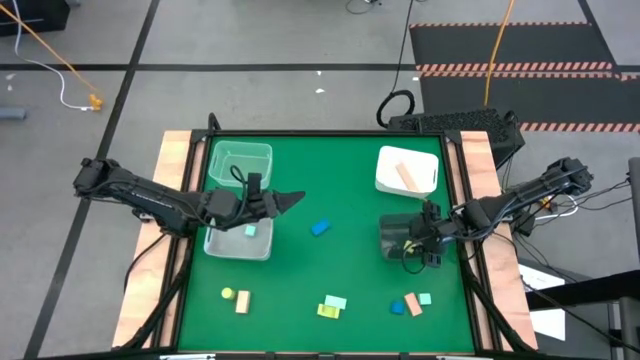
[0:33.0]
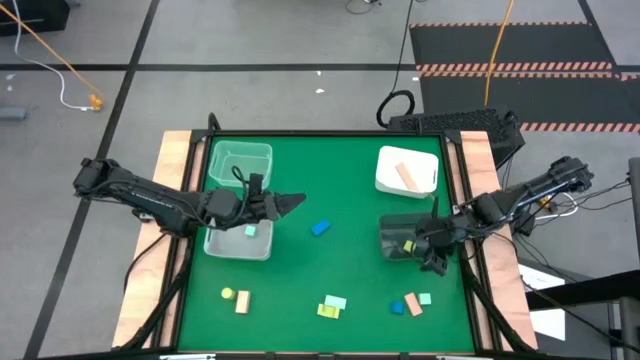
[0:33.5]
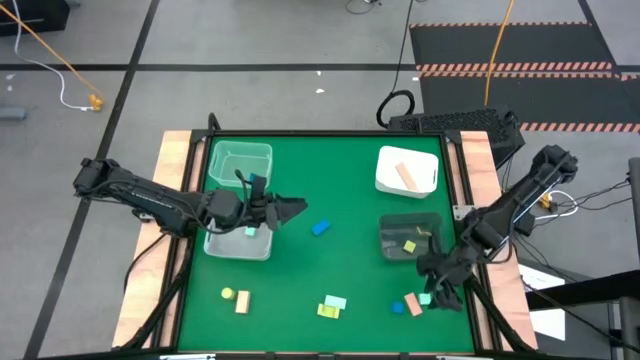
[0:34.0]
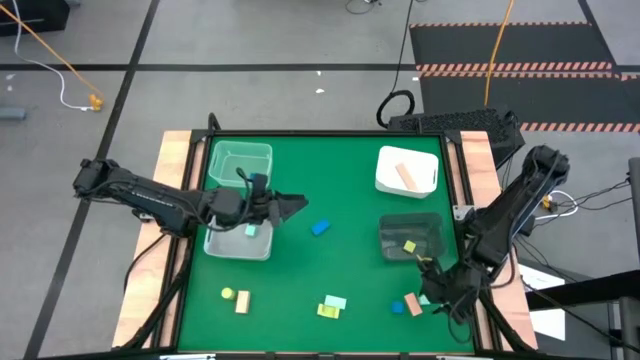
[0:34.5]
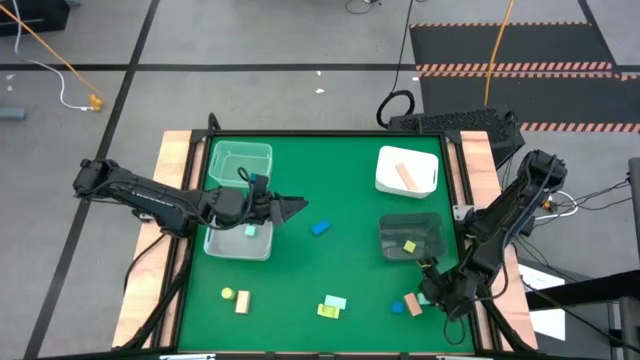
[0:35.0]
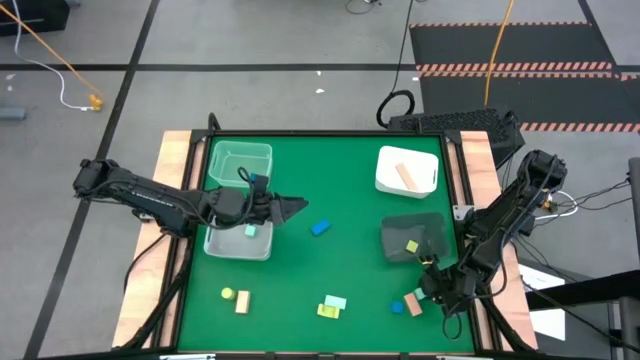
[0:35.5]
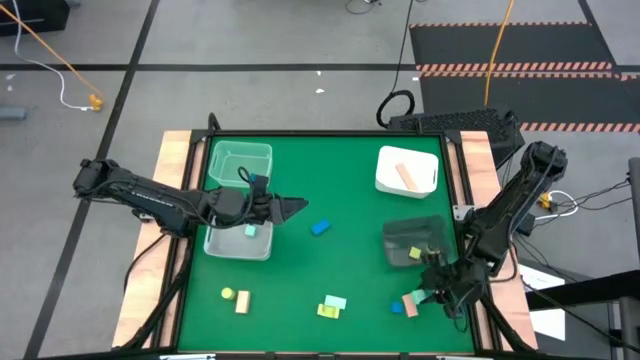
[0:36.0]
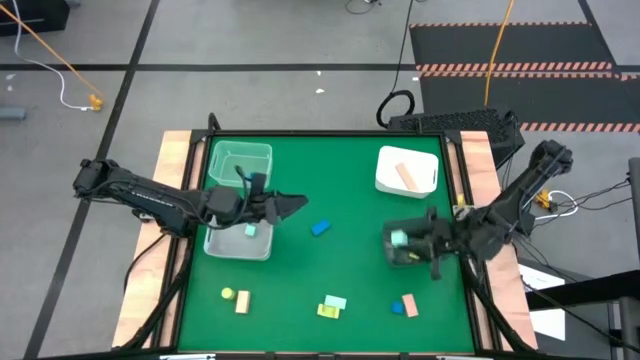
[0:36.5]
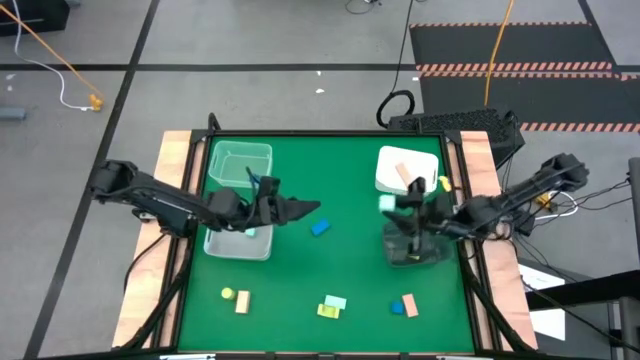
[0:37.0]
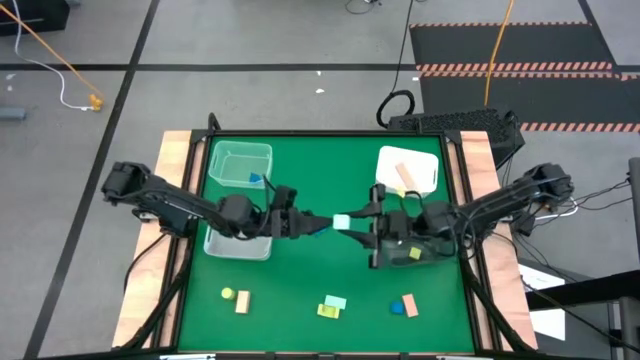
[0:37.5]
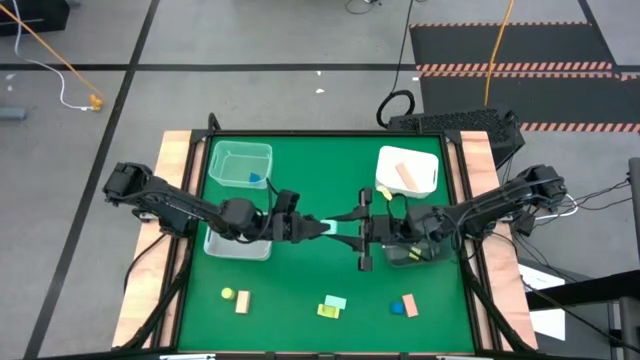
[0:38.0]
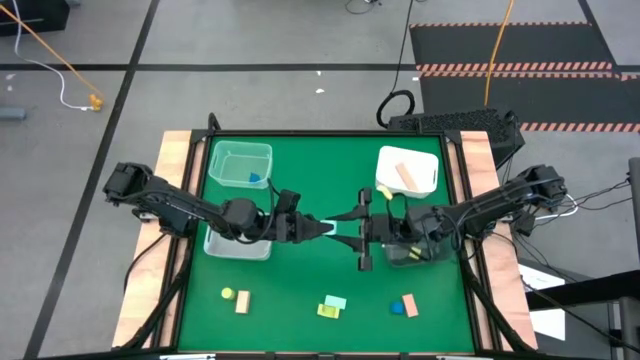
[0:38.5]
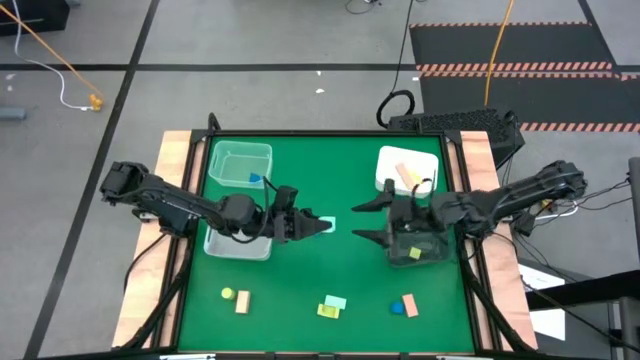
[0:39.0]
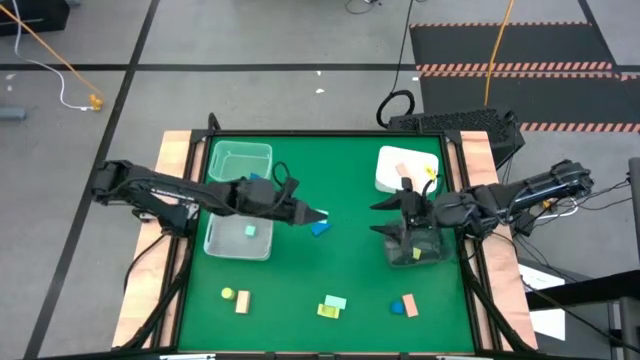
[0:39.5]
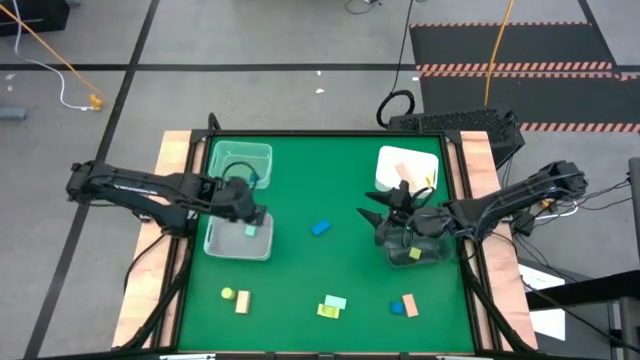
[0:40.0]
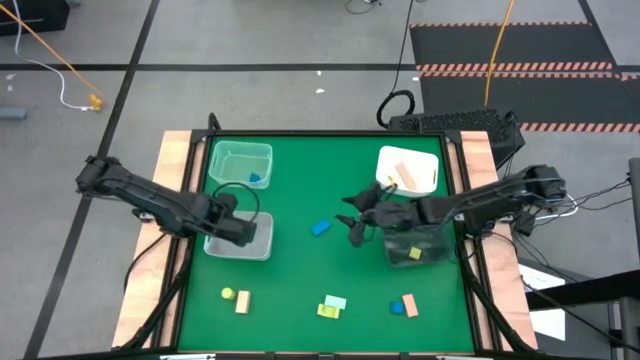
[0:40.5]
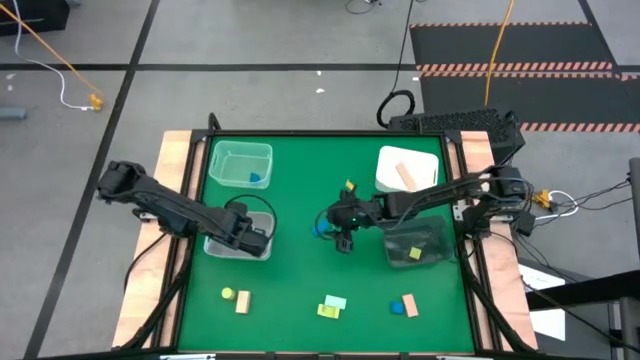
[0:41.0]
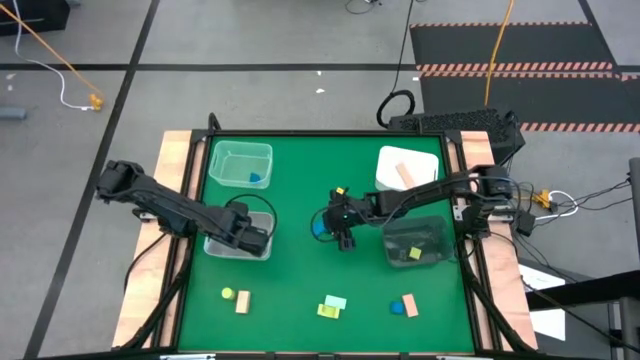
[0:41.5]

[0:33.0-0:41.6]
Task: Sort & place blocks by color
Put the right light blue block into the gray bin

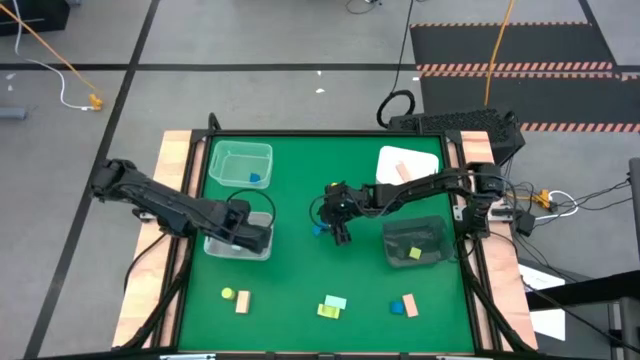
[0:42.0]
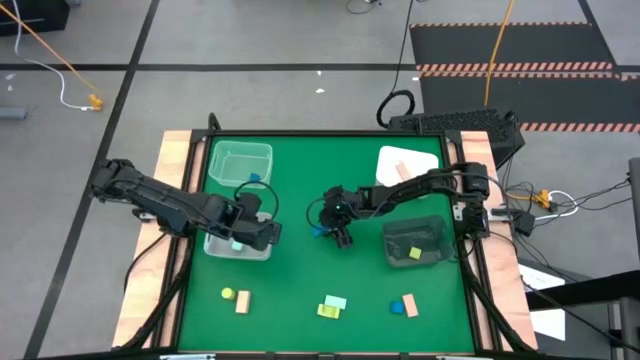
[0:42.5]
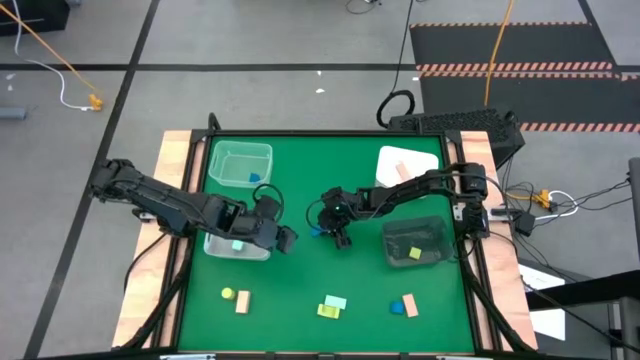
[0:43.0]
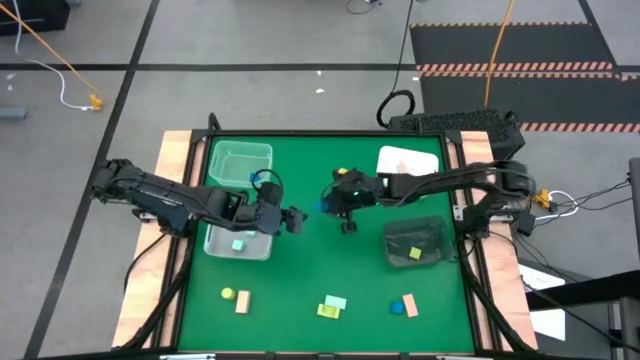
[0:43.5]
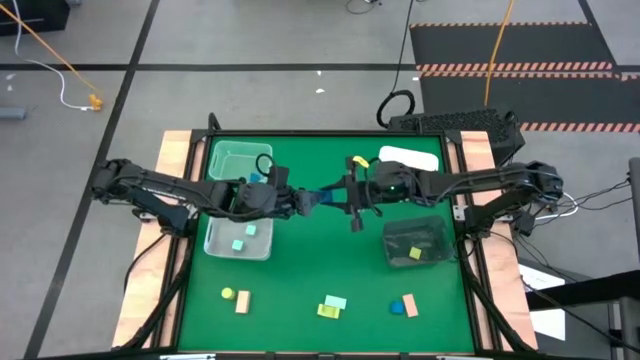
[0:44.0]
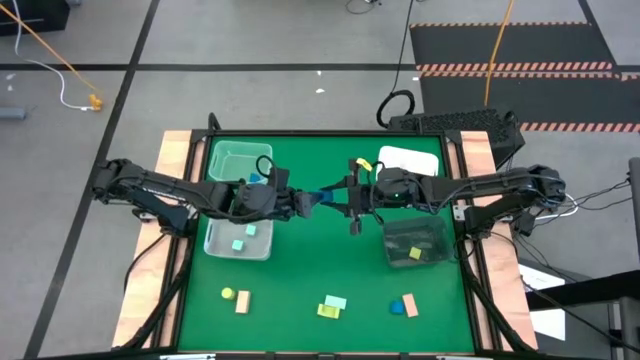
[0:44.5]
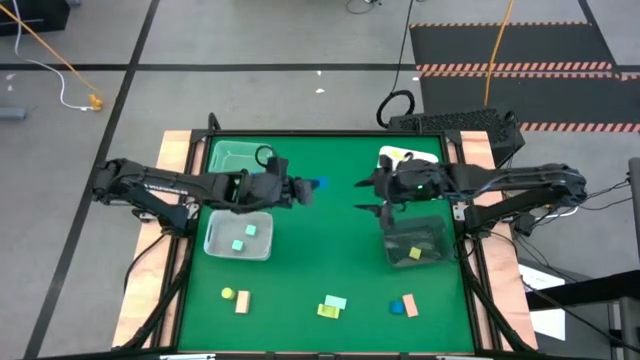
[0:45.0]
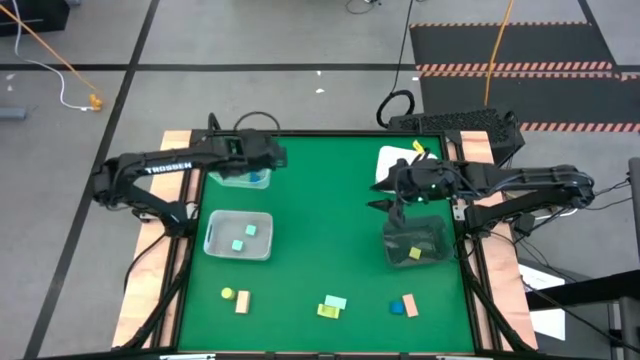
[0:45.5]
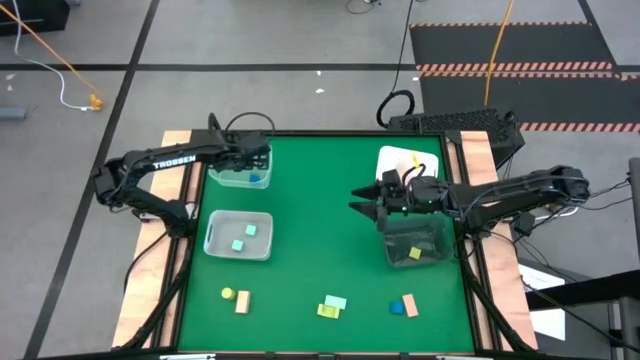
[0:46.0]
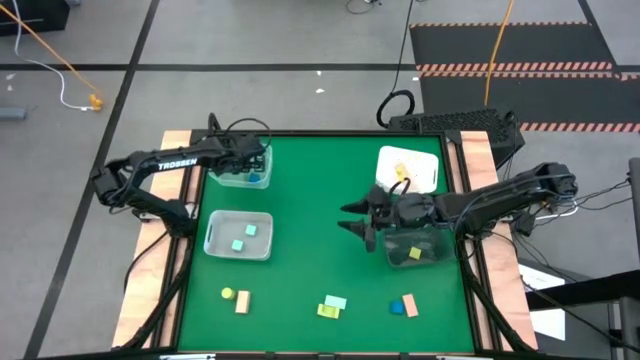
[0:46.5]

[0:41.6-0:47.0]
Put the top blue block into the white transparent bin

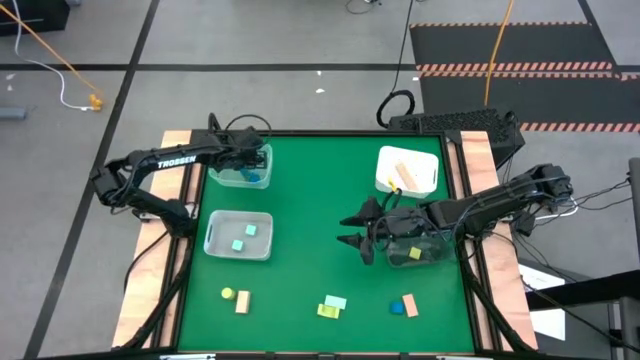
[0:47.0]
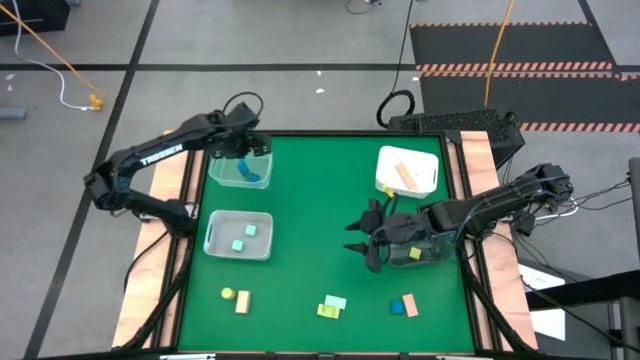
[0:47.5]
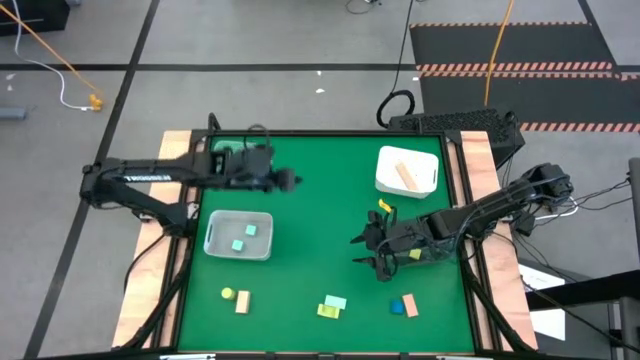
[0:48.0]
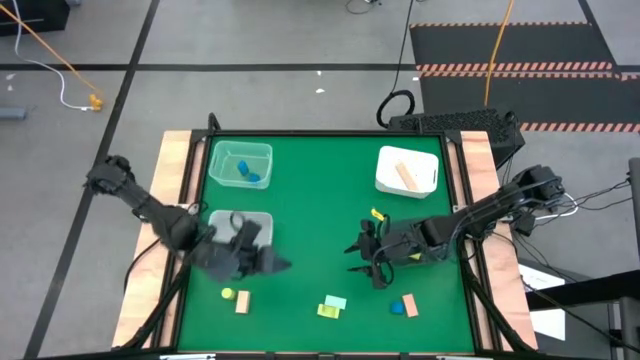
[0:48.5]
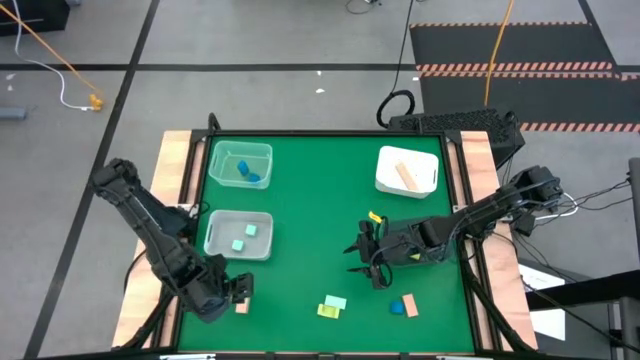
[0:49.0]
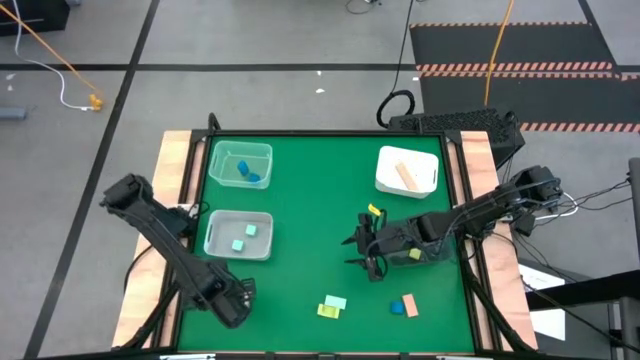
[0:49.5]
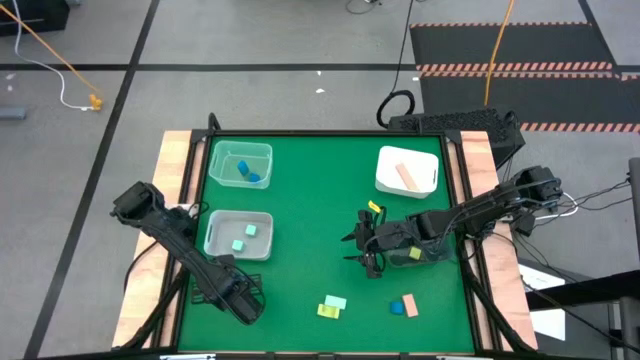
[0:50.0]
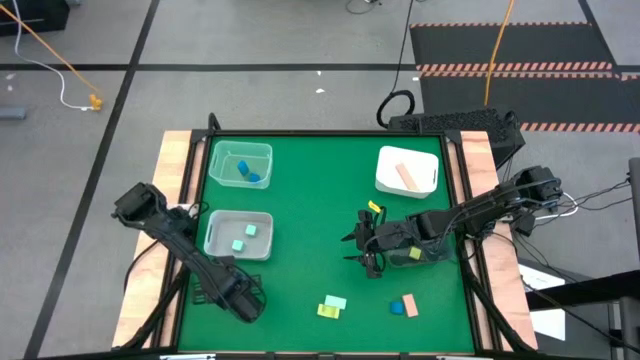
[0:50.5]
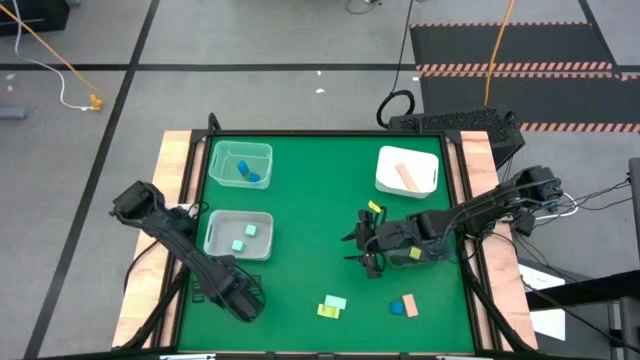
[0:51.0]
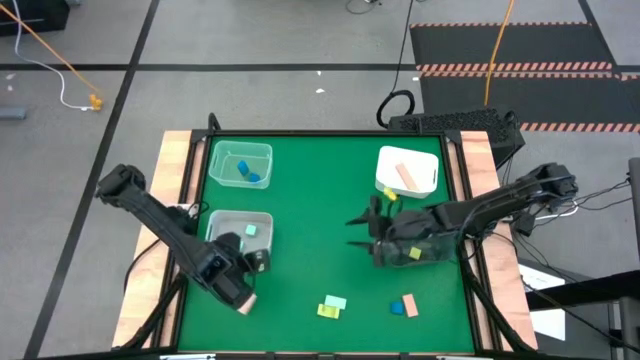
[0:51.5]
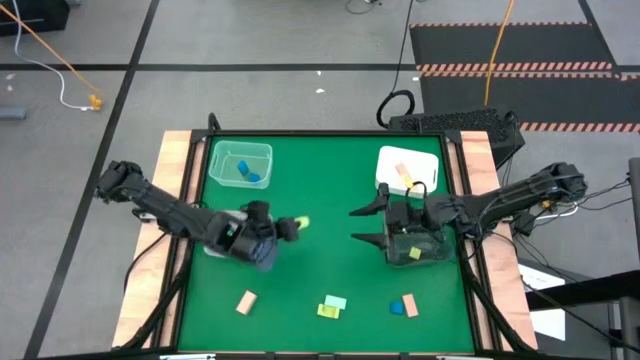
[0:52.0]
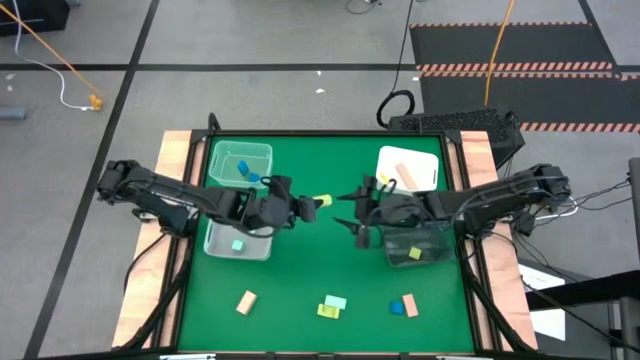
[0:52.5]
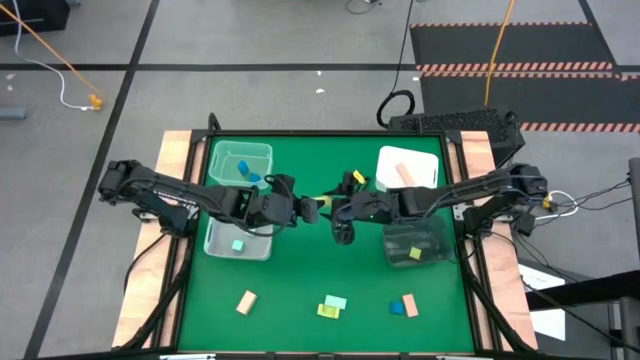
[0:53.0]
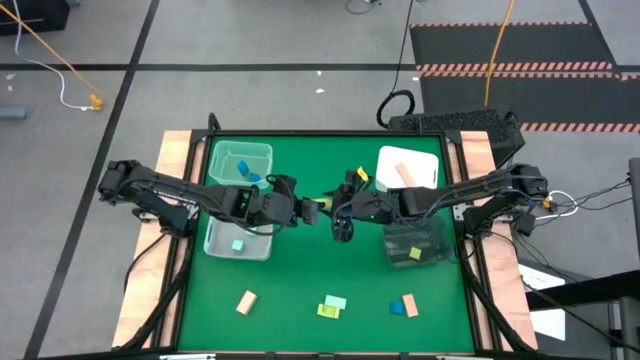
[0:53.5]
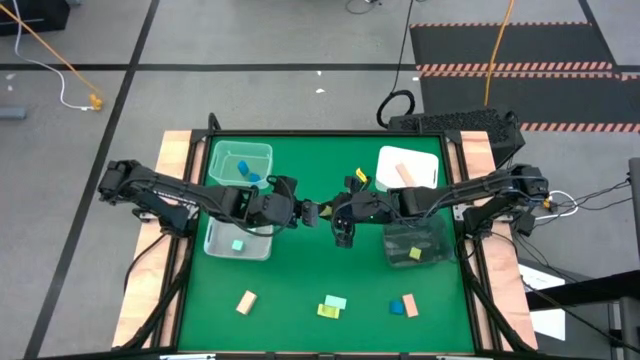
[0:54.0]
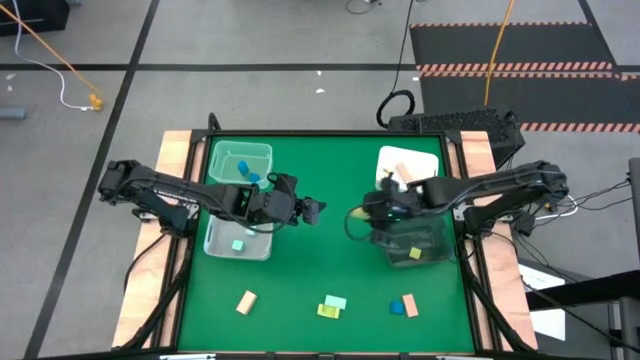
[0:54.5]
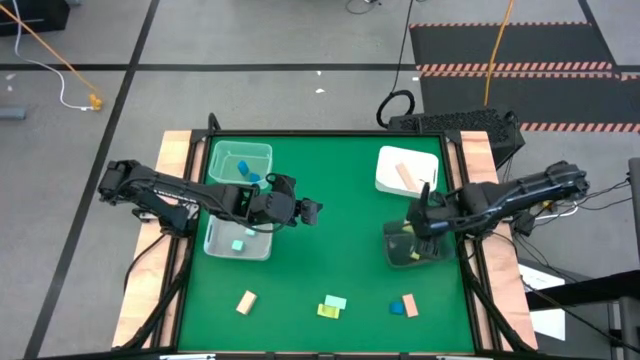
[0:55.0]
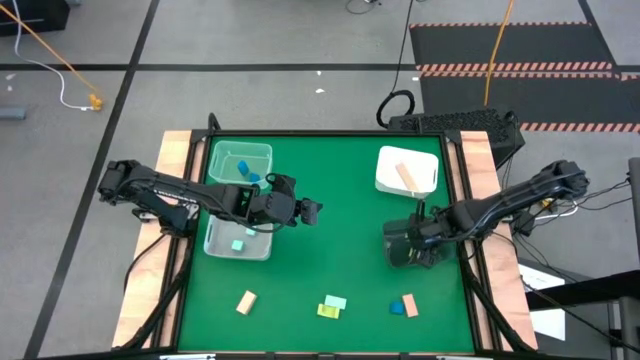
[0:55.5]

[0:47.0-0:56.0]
Put the left green cylinder block into the black transparent bin
